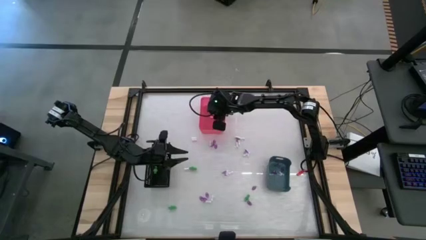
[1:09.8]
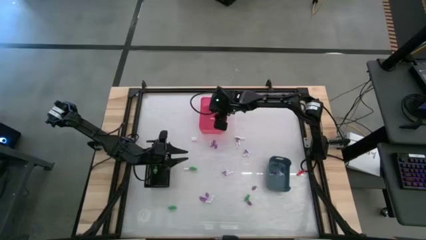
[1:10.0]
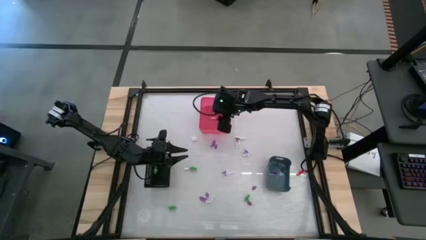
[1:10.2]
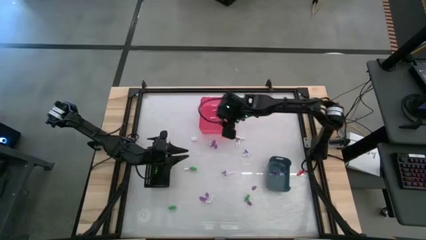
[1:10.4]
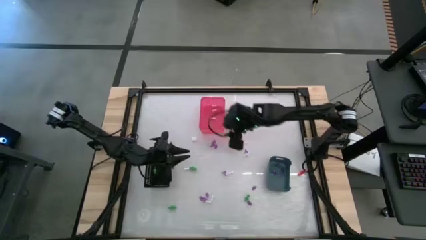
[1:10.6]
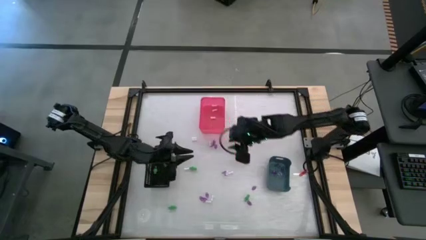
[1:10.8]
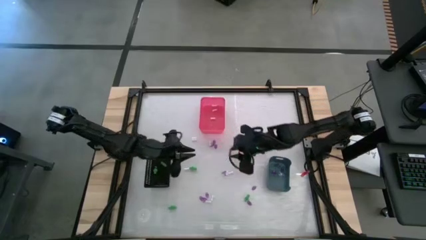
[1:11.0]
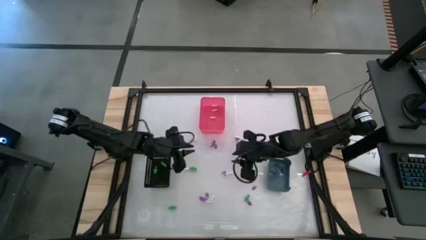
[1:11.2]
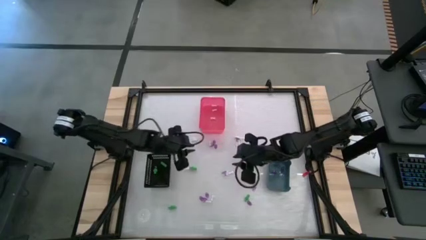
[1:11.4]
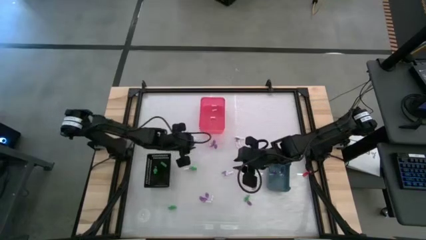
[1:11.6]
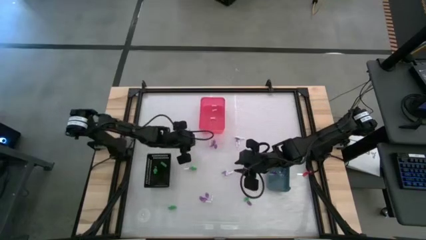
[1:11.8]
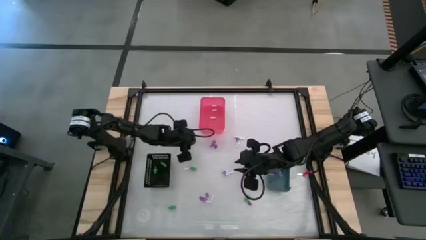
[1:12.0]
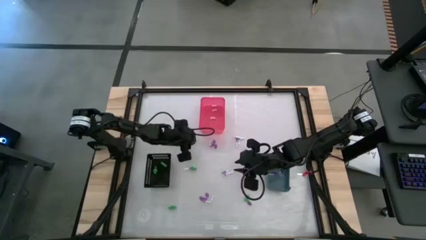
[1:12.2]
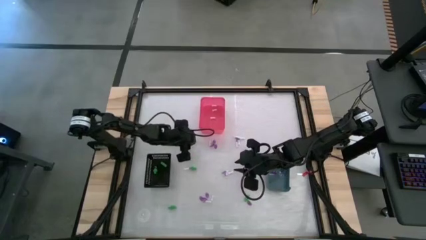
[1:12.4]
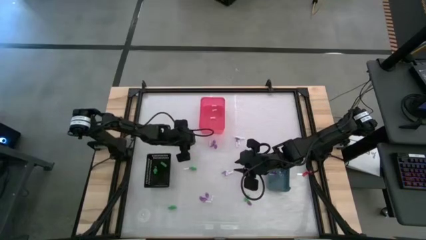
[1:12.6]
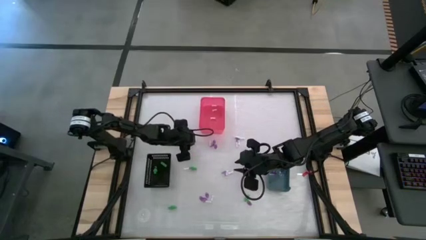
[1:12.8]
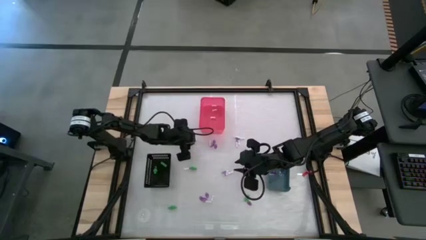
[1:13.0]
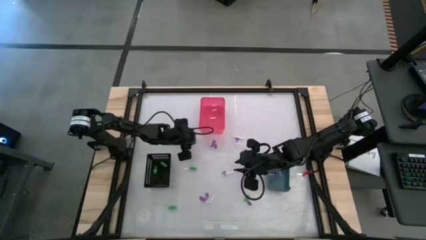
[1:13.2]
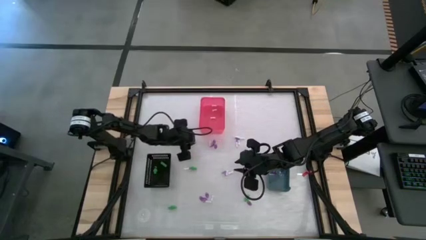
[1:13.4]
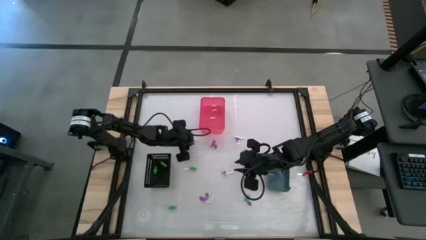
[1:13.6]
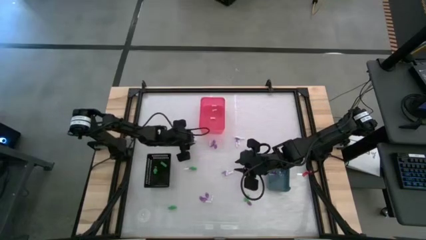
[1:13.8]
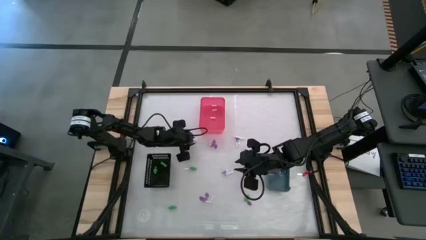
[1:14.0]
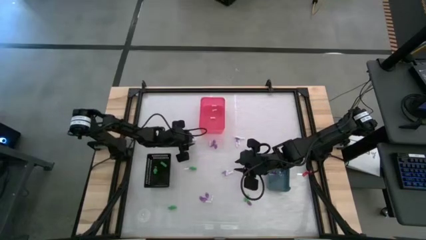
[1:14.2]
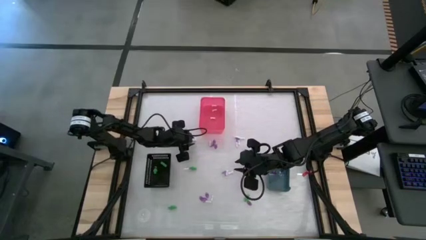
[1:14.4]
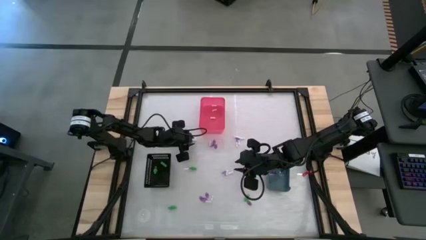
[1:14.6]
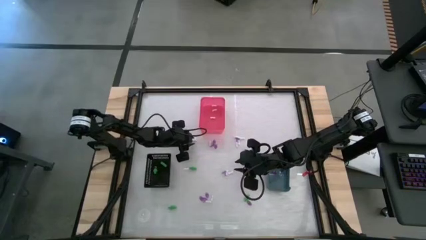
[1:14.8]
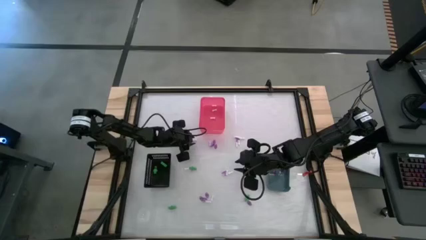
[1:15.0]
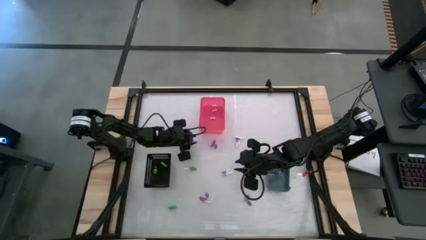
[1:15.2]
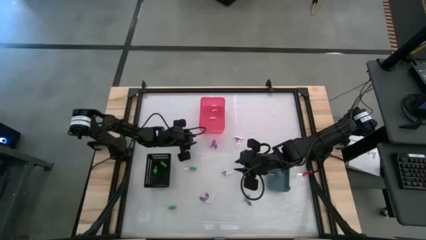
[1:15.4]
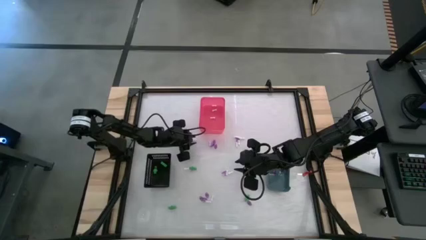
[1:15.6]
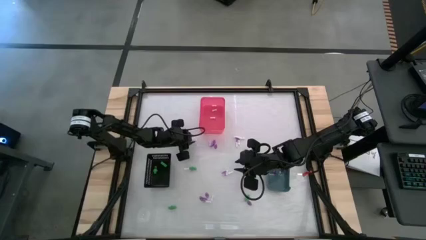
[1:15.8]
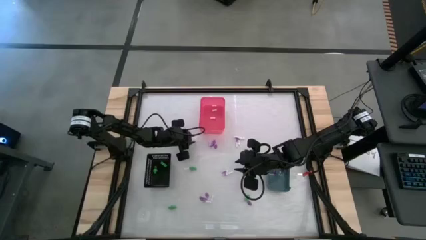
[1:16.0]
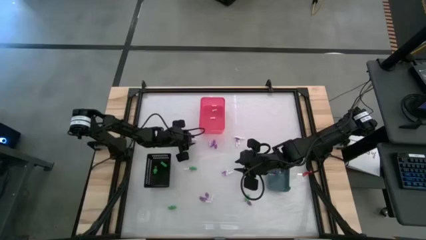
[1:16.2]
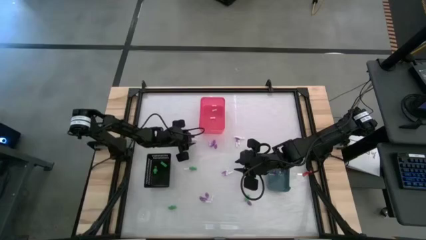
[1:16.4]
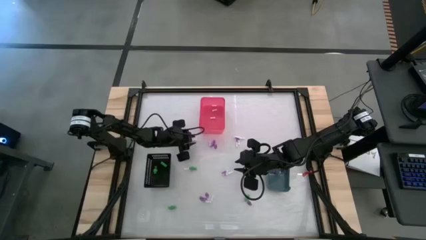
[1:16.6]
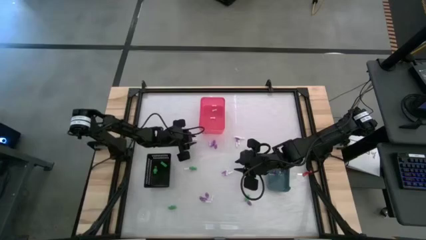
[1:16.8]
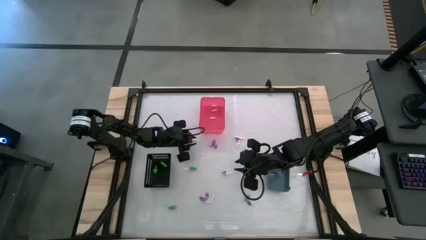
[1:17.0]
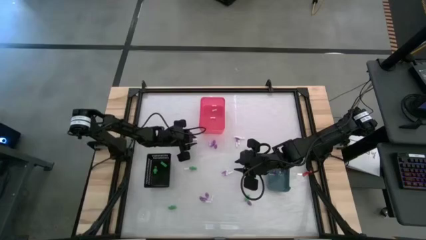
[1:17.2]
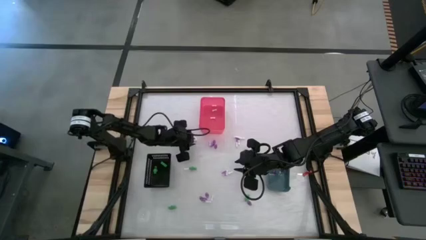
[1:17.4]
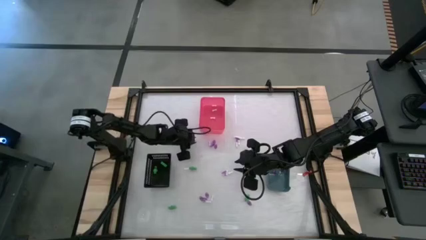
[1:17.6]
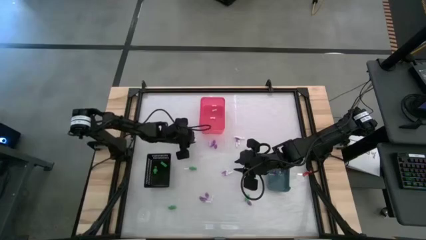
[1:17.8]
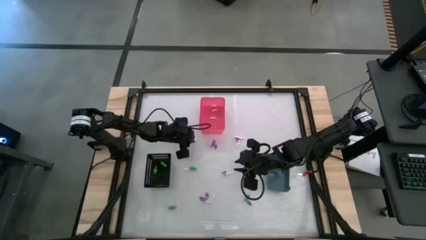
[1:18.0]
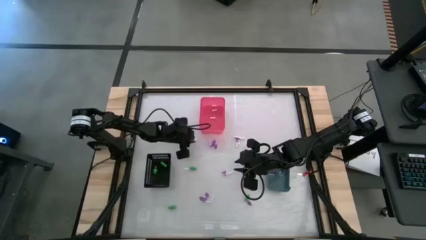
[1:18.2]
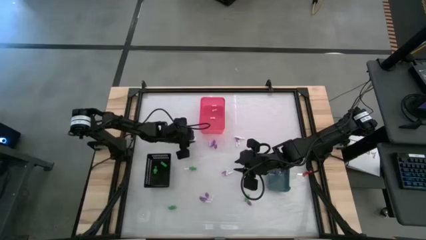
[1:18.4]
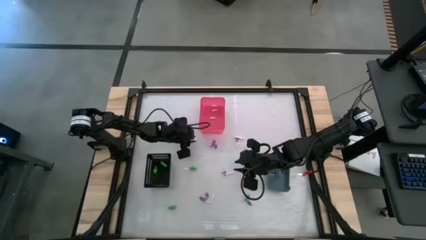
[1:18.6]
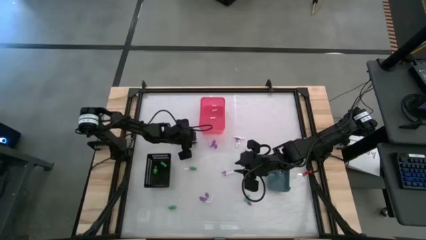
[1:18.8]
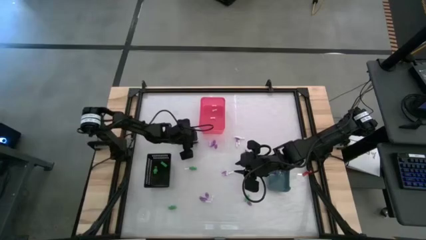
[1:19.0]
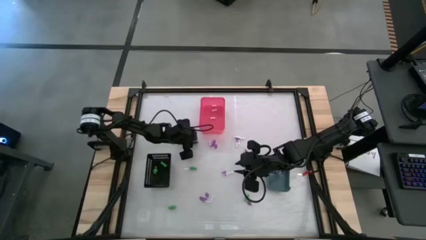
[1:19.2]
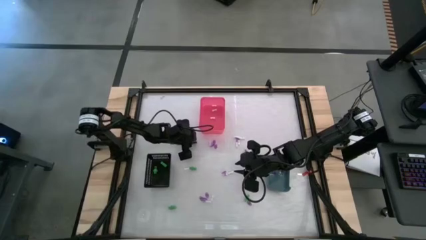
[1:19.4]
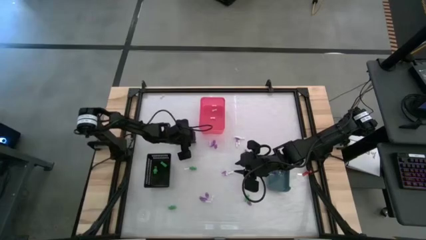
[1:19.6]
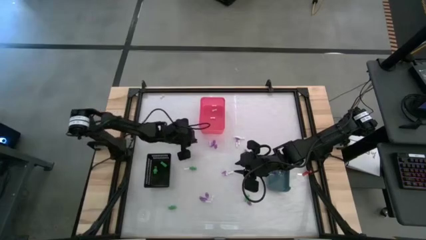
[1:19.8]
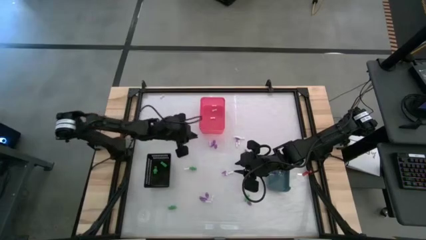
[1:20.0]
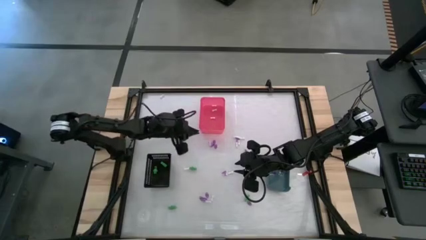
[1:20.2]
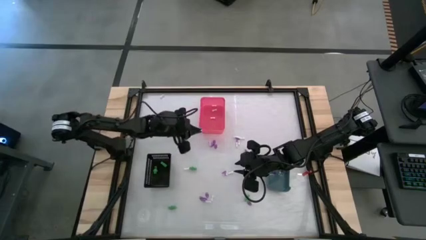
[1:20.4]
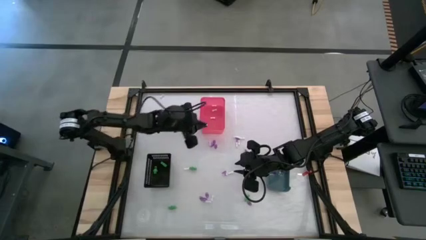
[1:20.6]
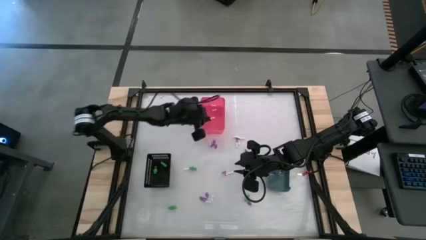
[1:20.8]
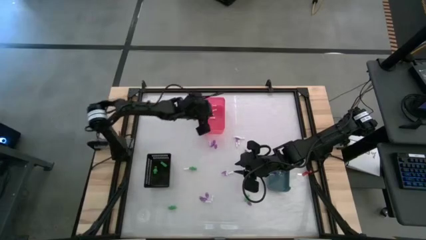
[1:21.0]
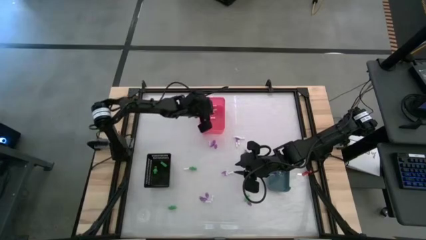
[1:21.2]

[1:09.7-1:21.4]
Task: Sort Halloween decoration
Put the bone toy into the red bin

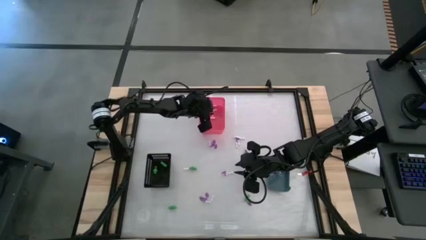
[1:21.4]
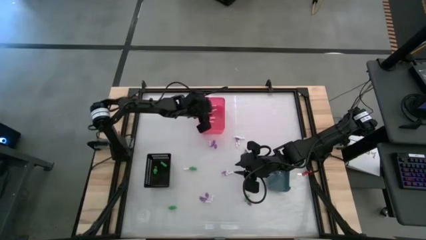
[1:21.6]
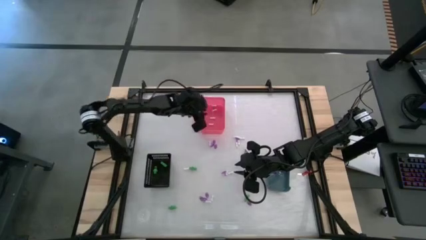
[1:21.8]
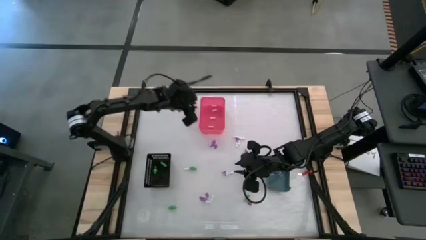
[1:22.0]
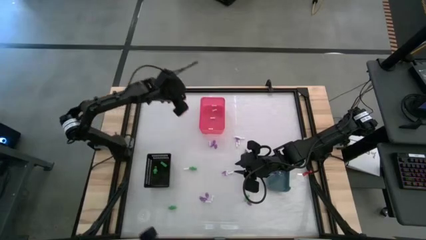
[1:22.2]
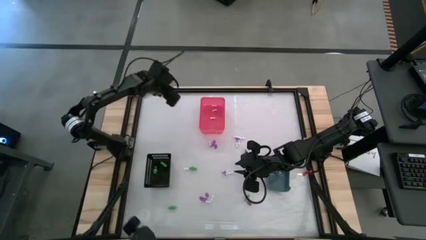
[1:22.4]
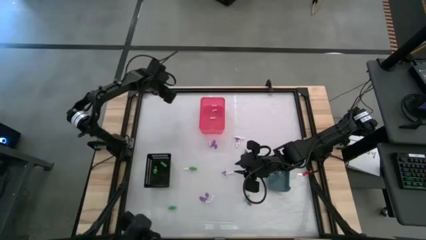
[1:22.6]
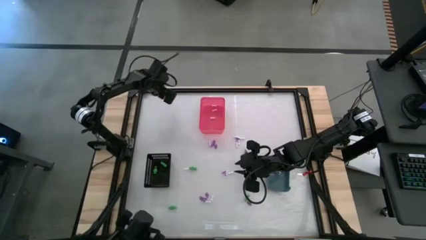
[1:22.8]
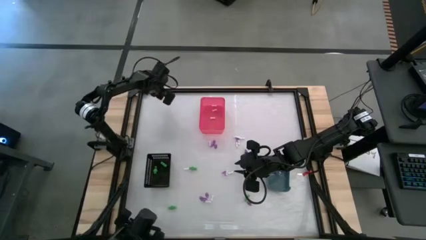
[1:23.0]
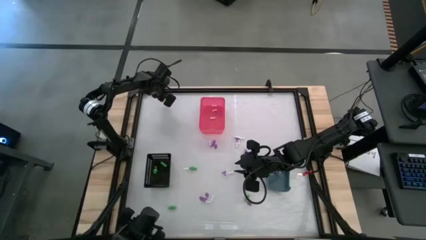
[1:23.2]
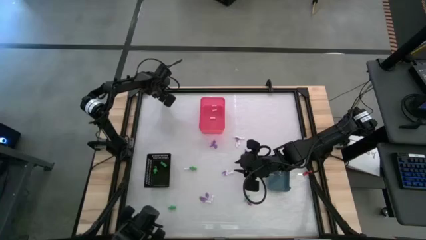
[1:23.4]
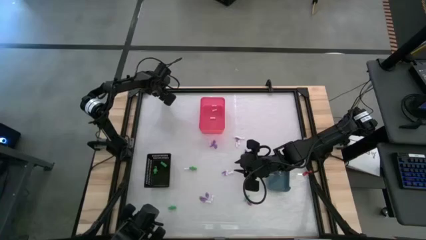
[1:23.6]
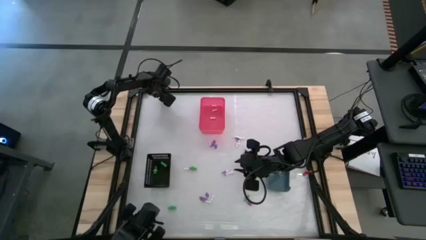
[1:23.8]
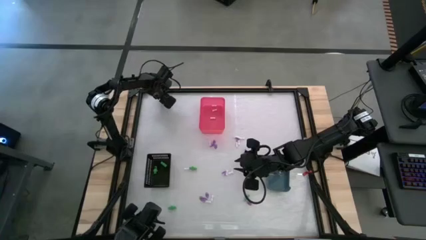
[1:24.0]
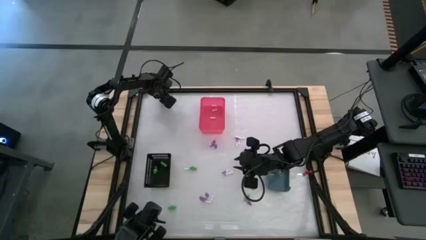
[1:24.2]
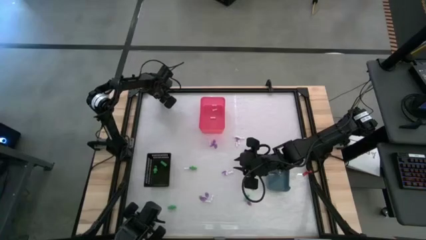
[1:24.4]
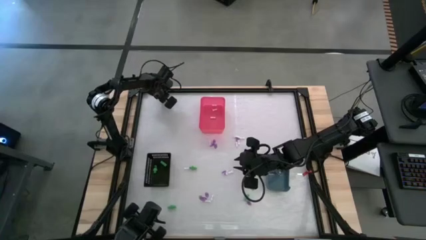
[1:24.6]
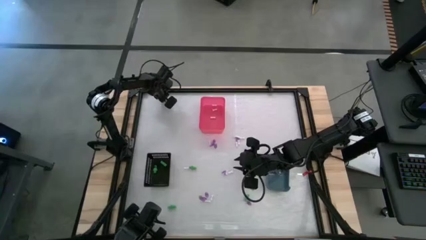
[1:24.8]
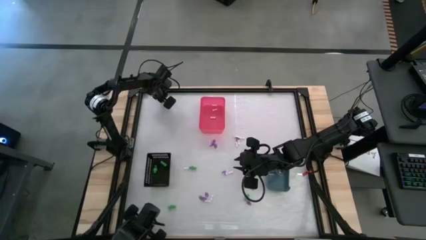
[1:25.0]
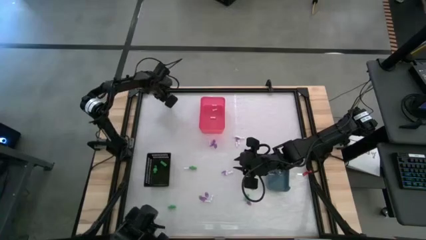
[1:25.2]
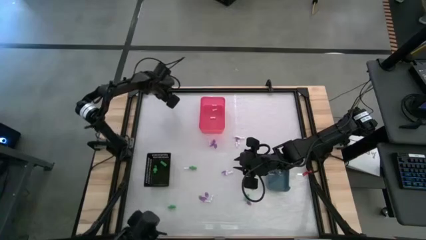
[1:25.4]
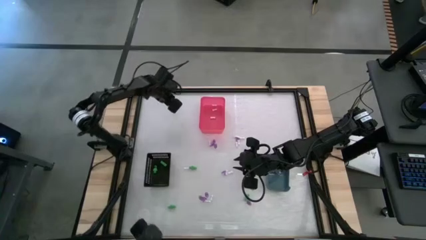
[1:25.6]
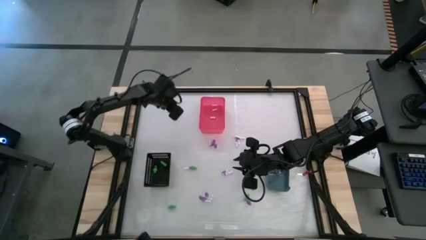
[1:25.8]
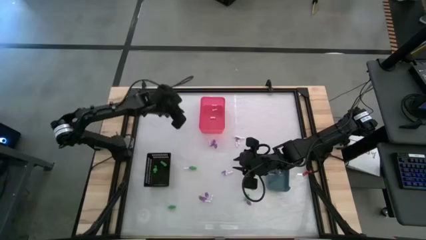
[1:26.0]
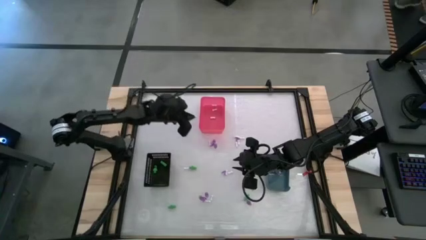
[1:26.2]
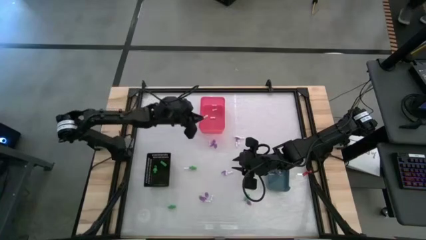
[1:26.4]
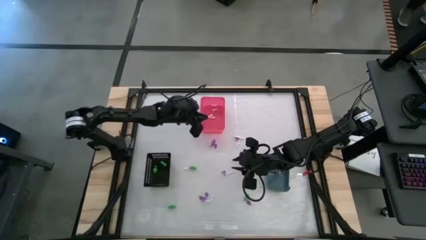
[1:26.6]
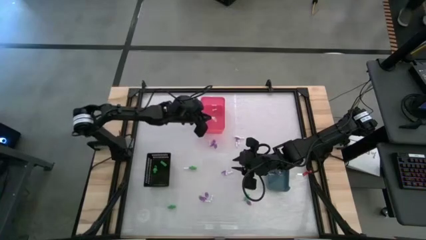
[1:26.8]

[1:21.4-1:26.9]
Put the bone toy into the red bin
